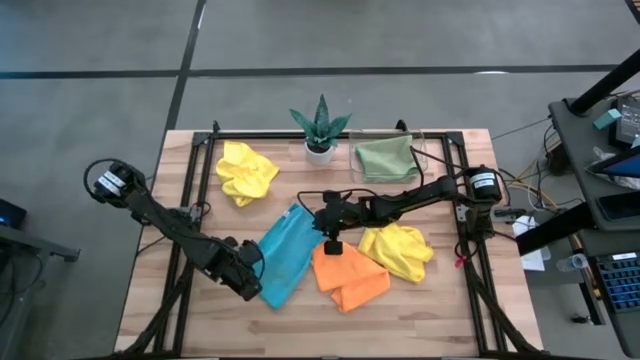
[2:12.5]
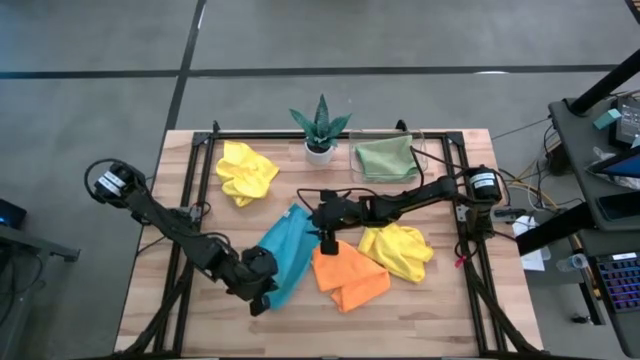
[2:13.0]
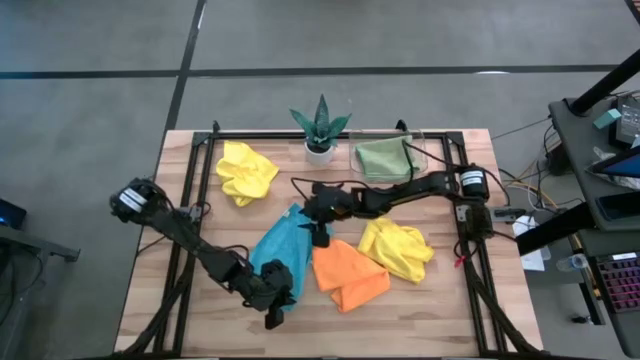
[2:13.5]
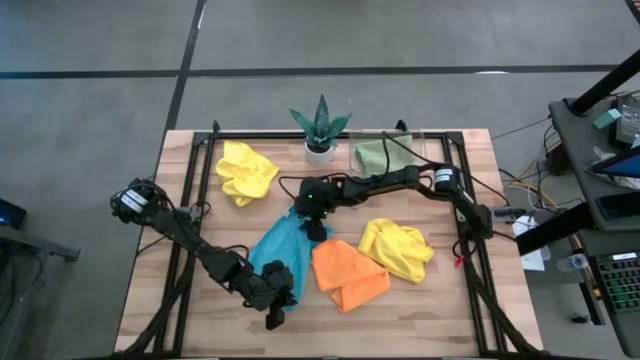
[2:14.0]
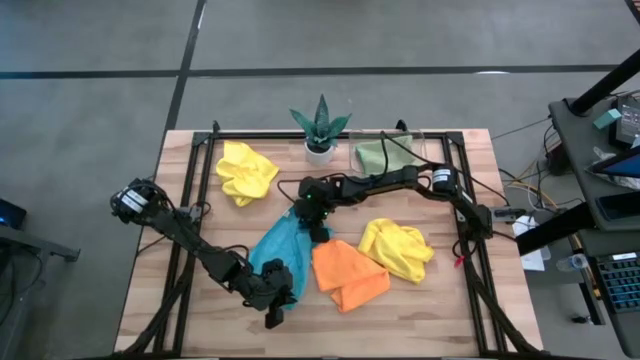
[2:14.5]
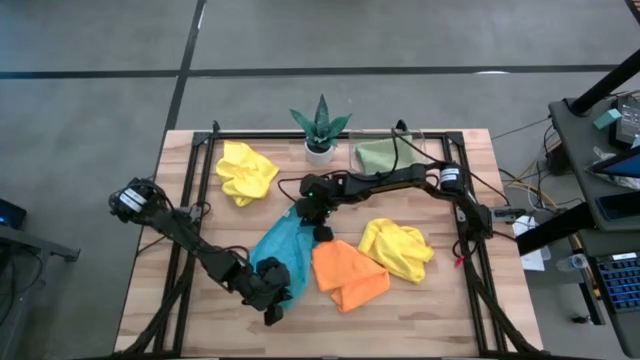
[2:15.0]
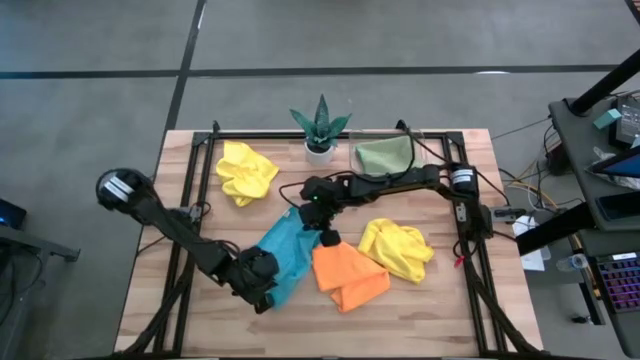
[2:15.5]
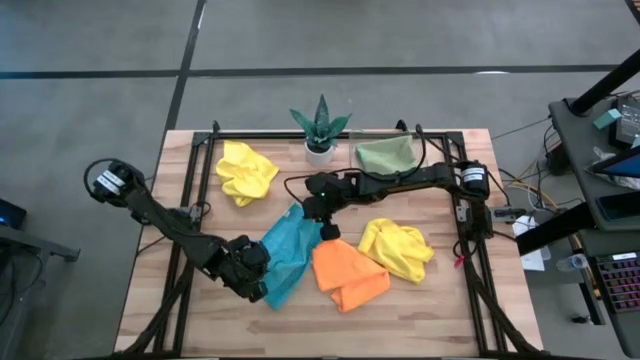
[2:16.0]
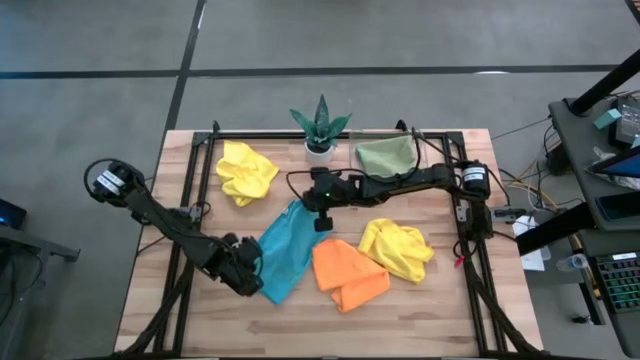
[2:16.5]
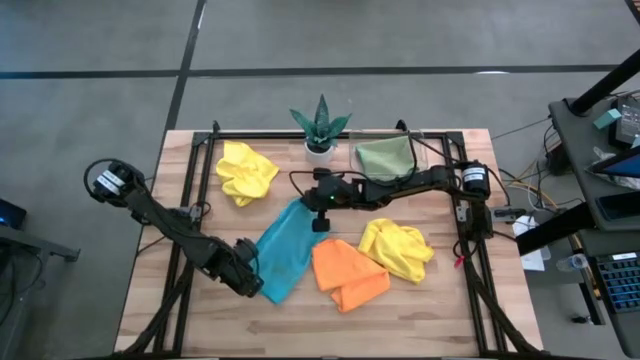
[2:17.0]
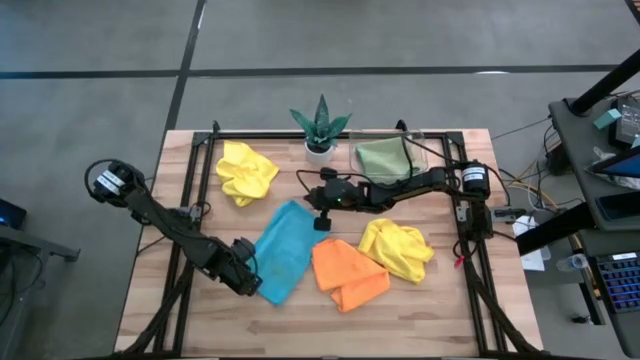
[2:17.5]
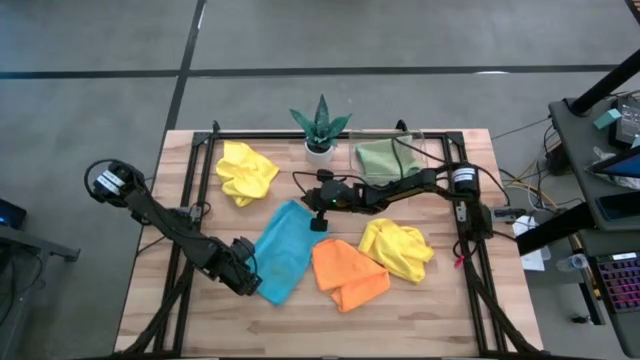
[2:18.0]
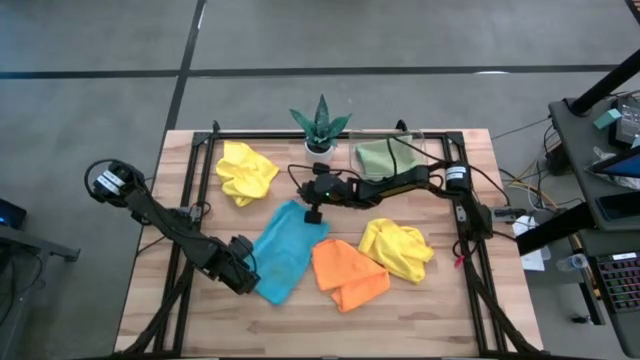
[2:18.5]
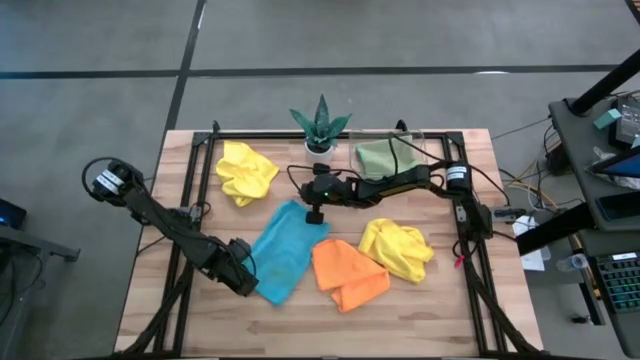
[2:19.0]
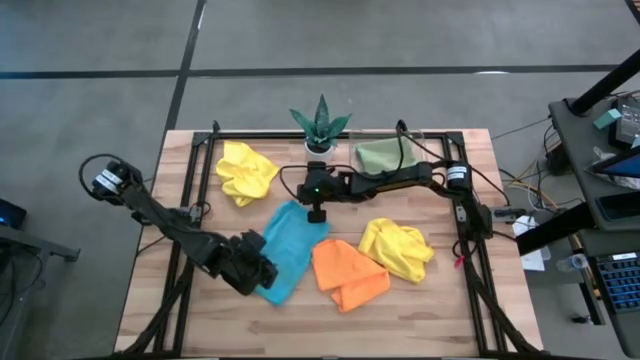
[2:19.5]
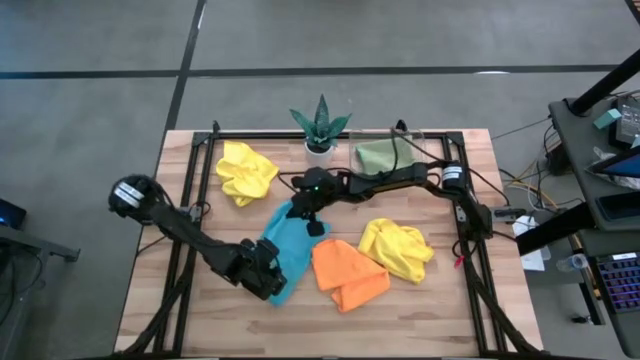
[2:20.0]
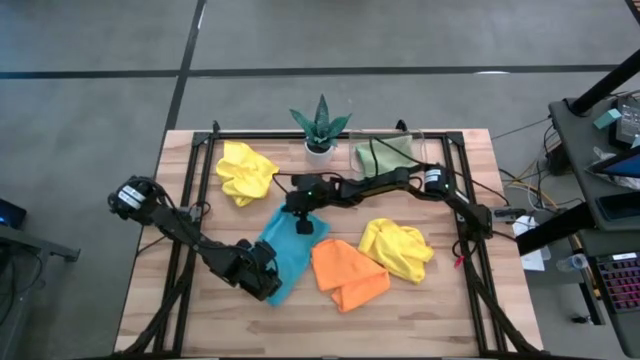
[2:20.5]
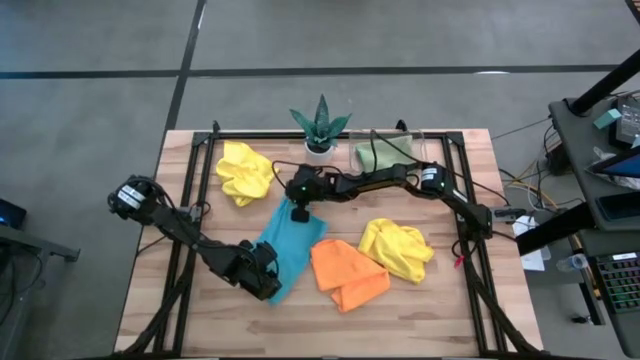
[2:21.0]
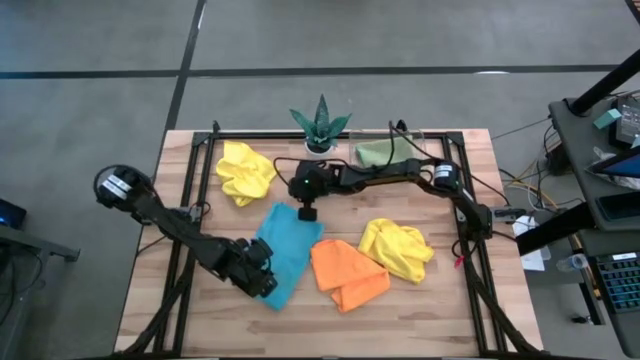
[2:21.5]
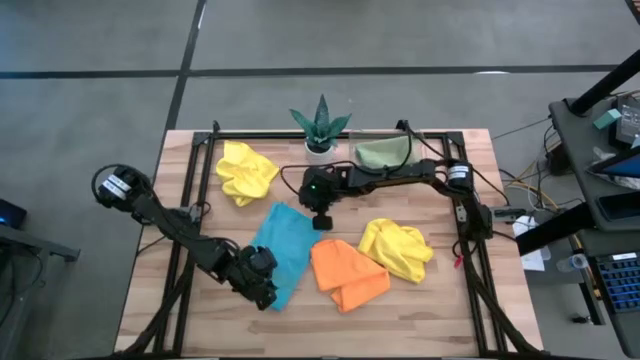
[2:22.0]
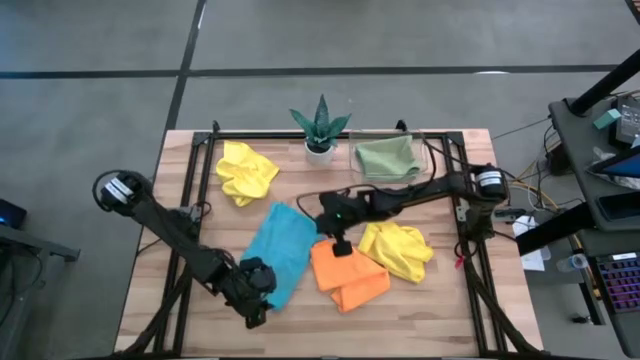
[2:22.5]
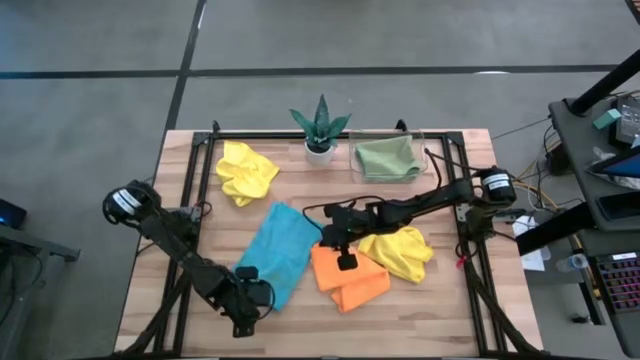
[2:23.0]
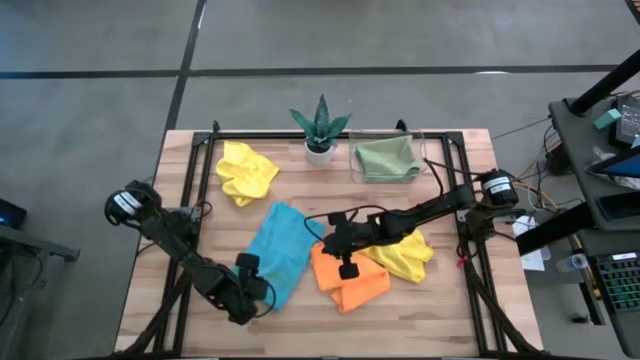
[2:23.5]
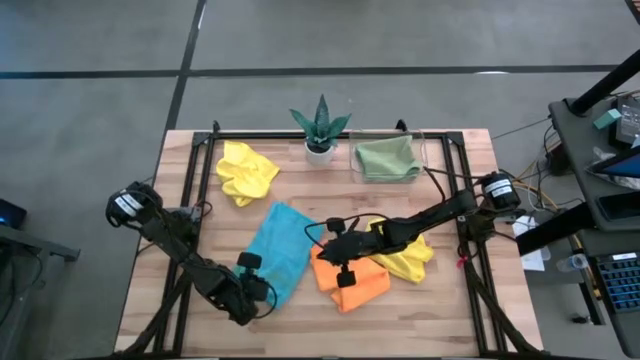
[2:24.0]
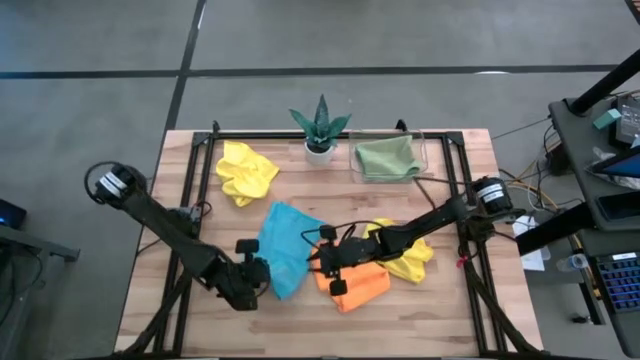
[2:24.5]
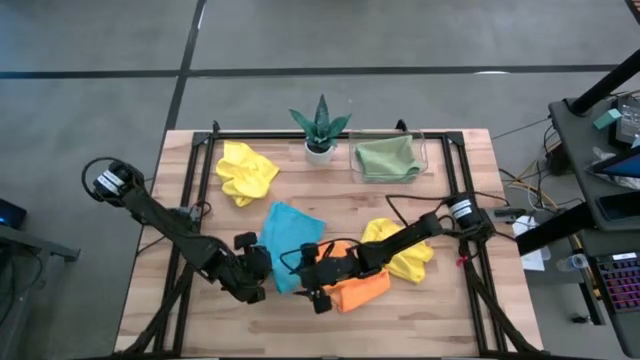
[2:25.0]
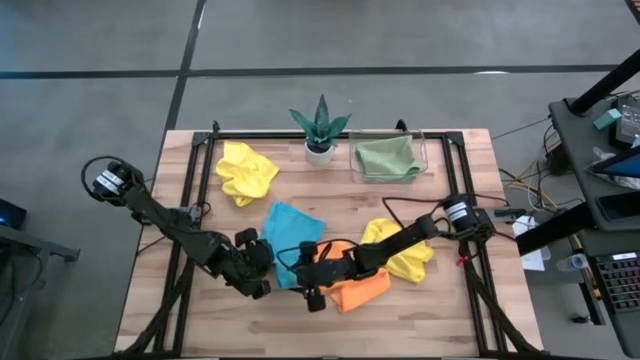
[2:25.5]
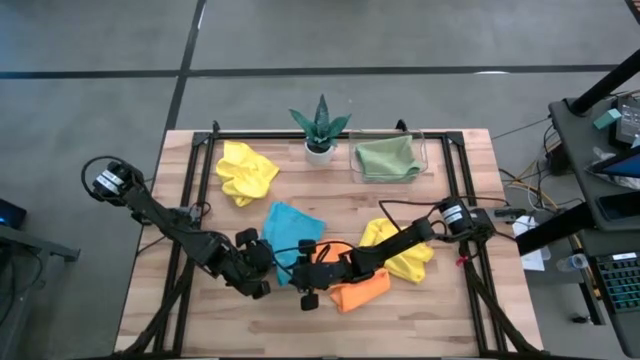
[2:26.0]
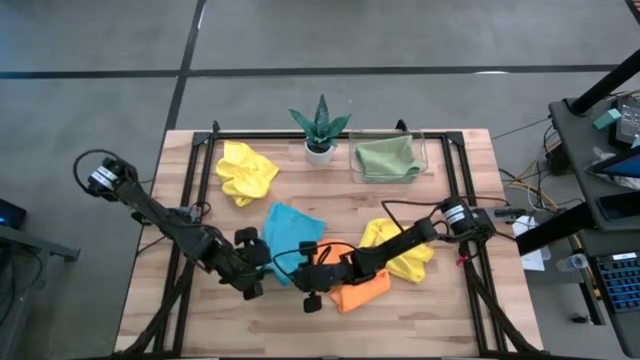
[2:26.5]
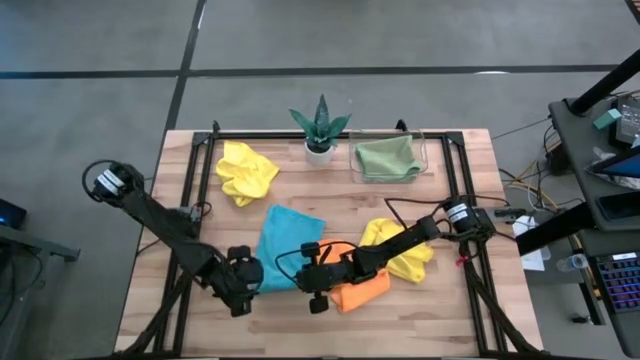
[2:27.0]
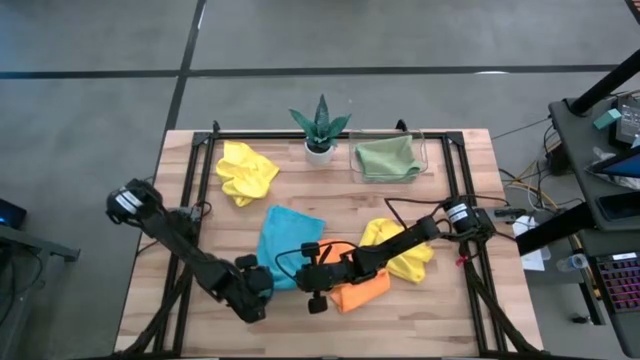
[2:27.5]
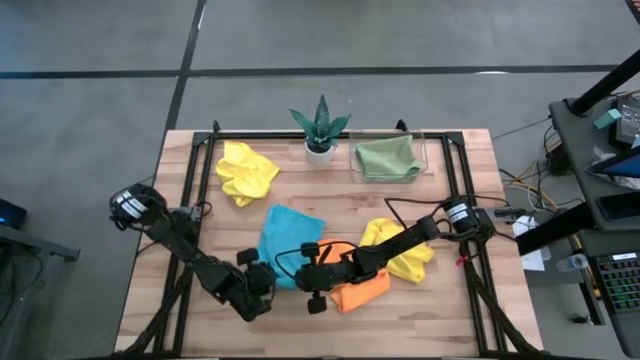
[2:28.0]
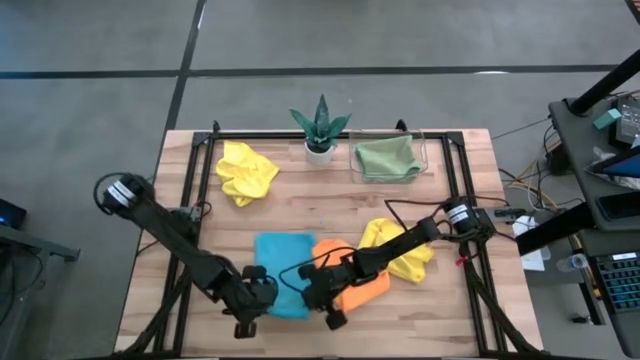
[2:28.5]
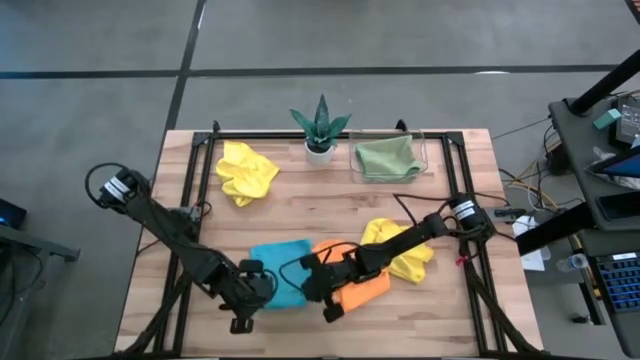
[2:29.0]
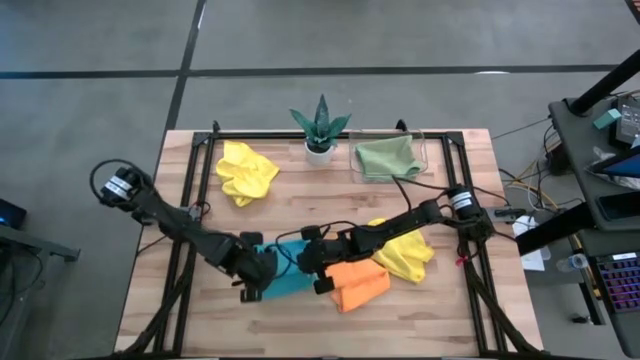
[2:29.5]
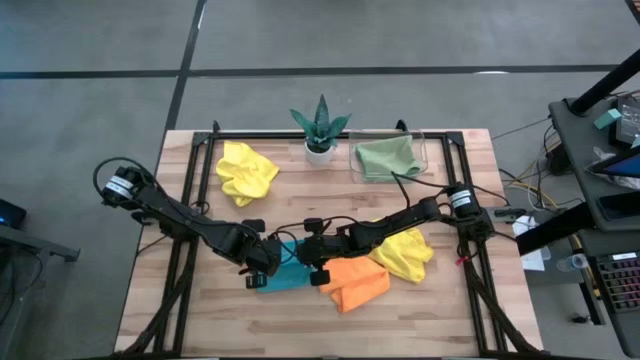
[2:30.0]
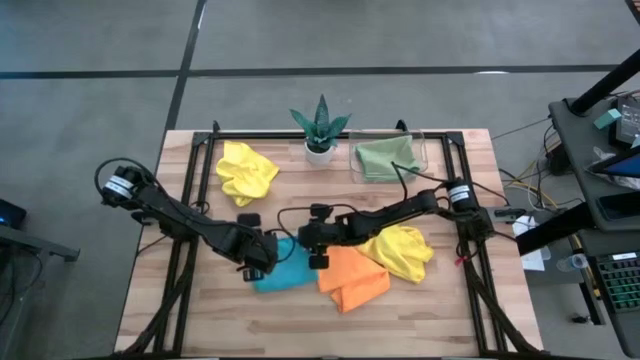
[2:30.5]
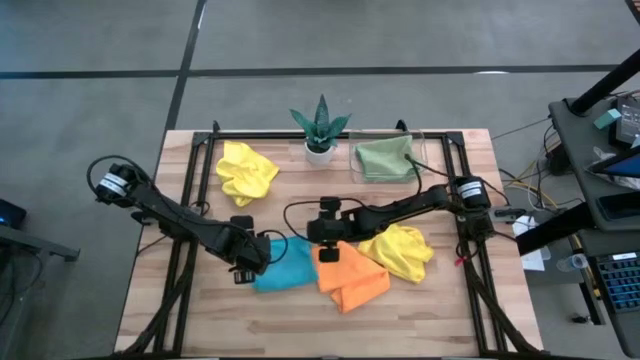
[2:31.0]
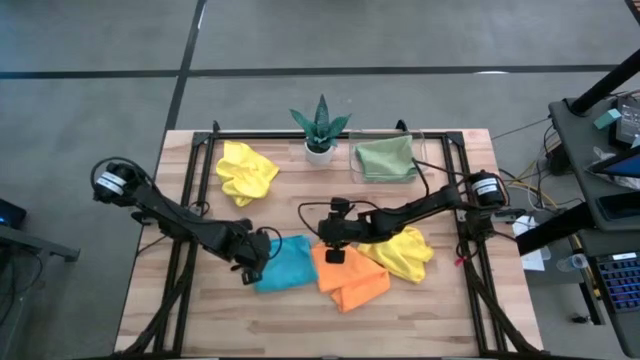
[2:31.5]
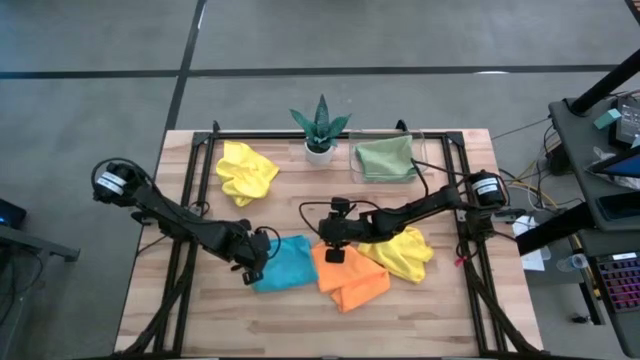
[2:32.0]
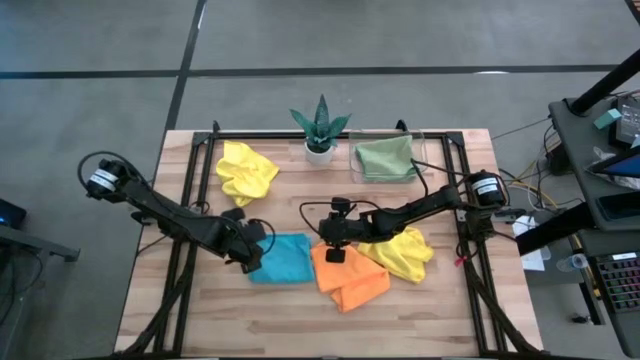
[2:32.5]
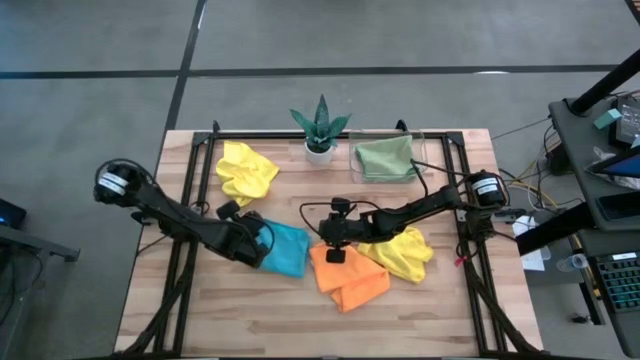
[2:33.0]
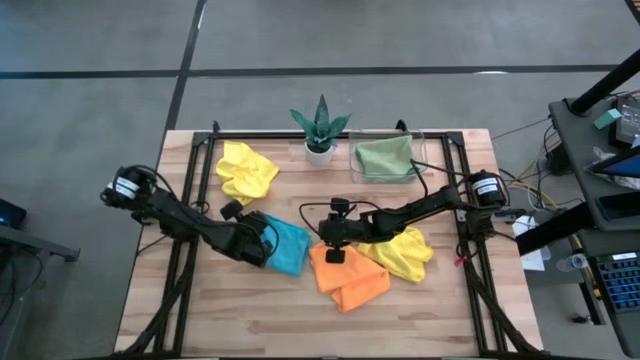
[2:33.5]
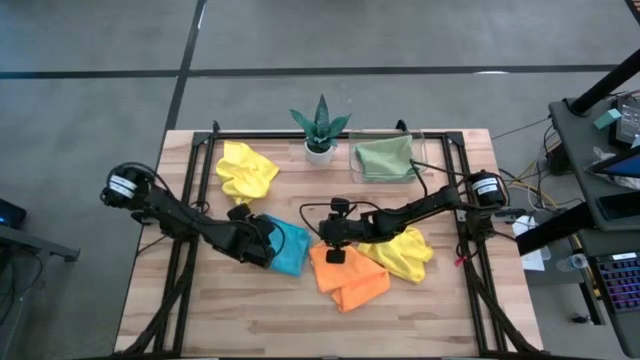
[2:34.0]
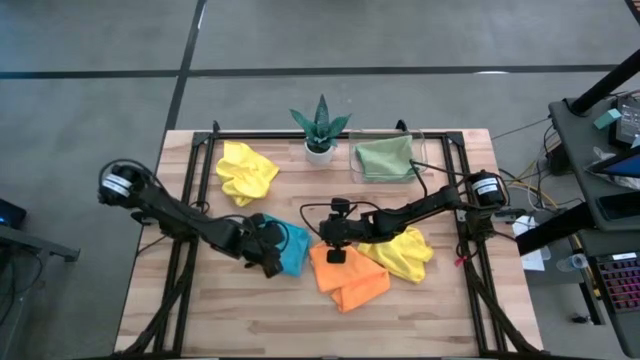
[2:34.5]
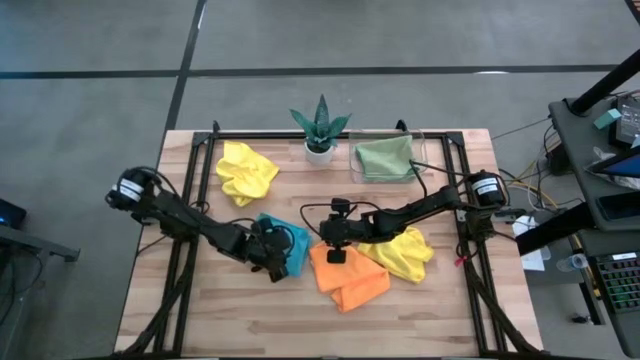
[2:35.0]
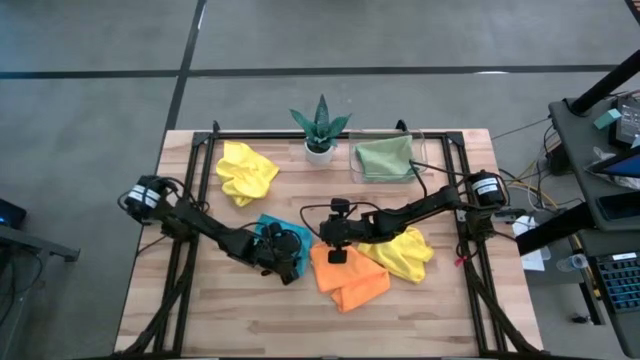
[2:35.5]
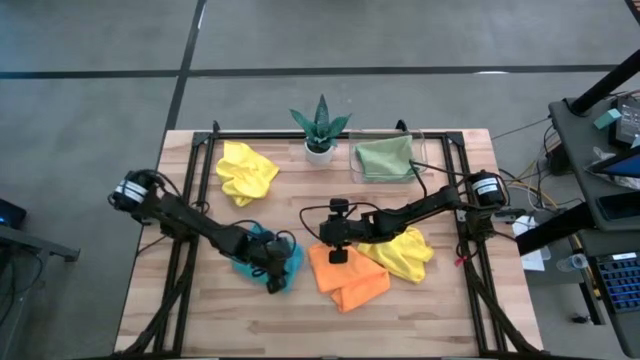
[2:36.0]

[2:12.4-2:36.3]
Task: Fold microfiber towels
Fold the blue microfiber towel
